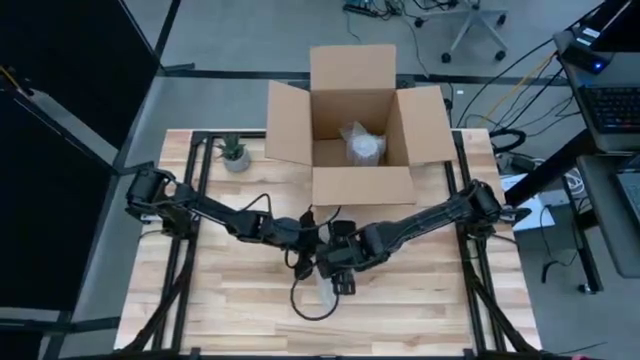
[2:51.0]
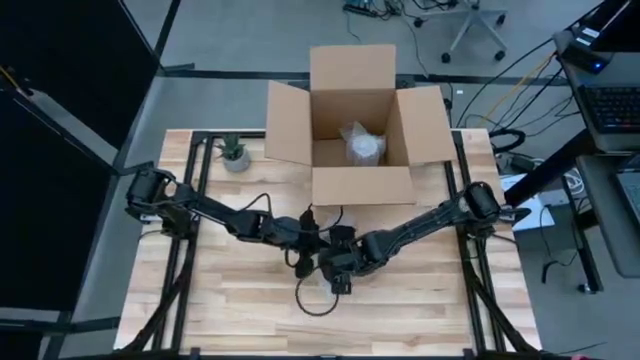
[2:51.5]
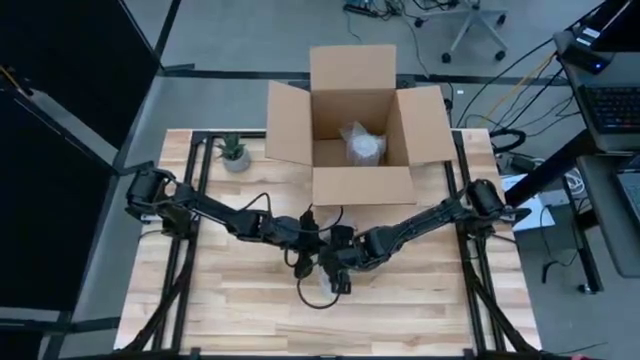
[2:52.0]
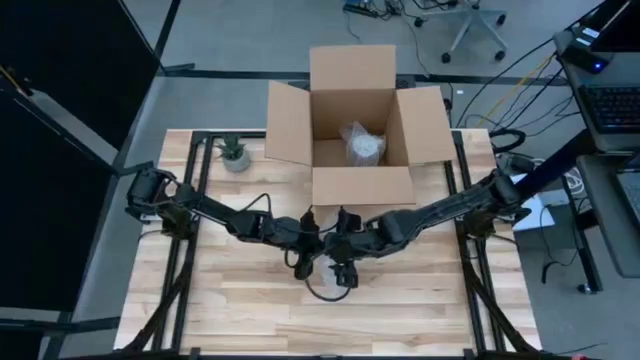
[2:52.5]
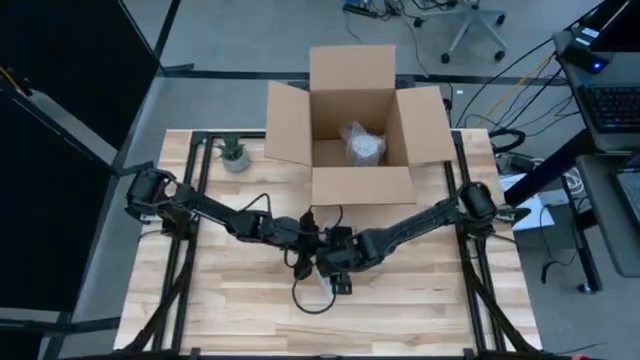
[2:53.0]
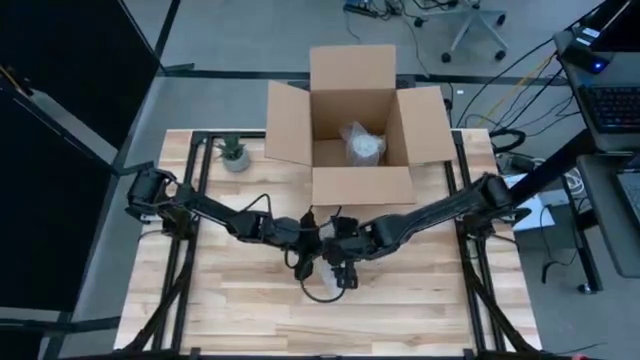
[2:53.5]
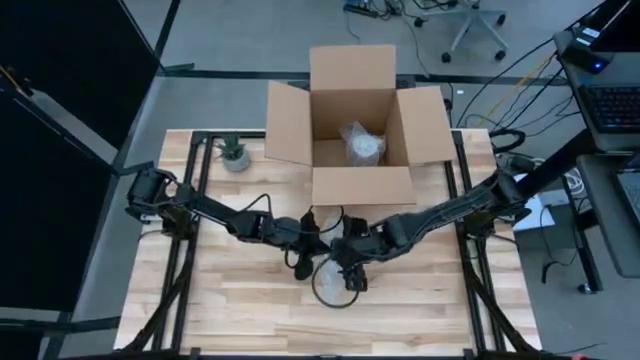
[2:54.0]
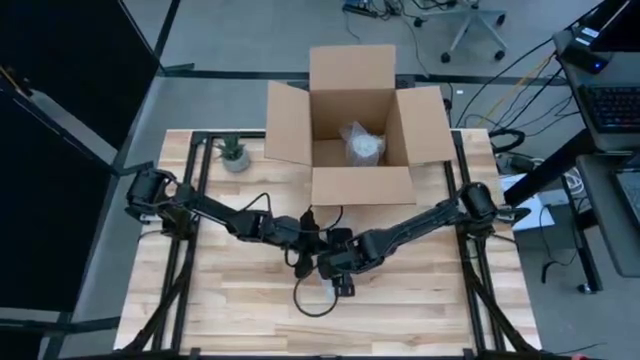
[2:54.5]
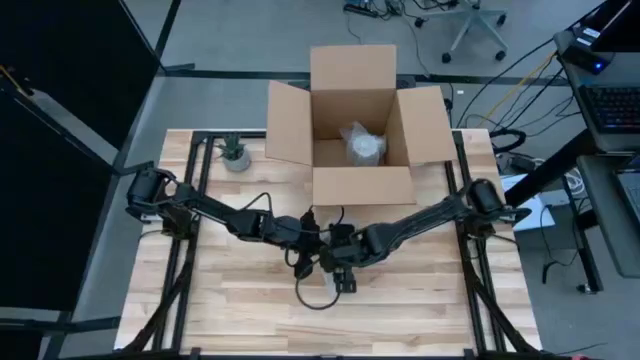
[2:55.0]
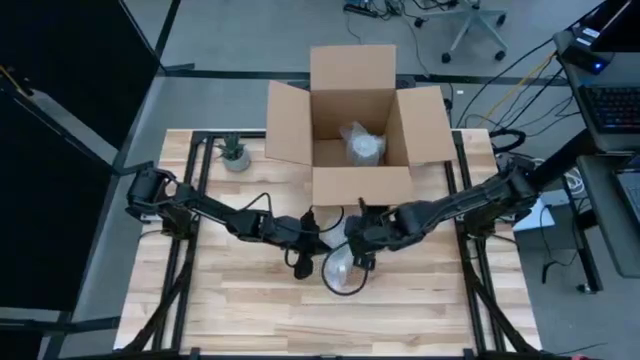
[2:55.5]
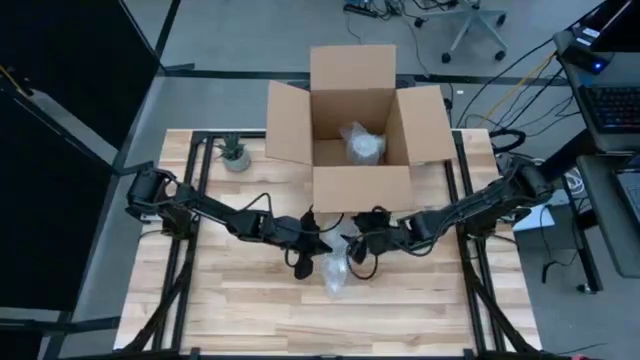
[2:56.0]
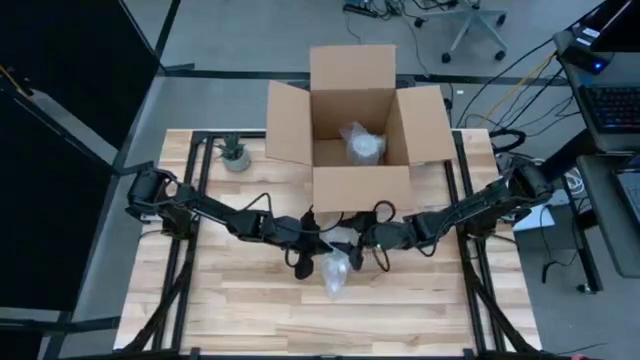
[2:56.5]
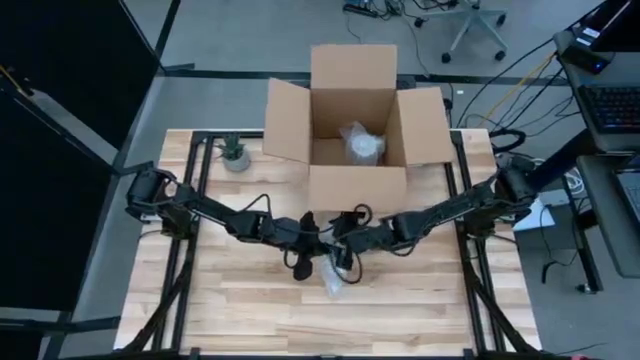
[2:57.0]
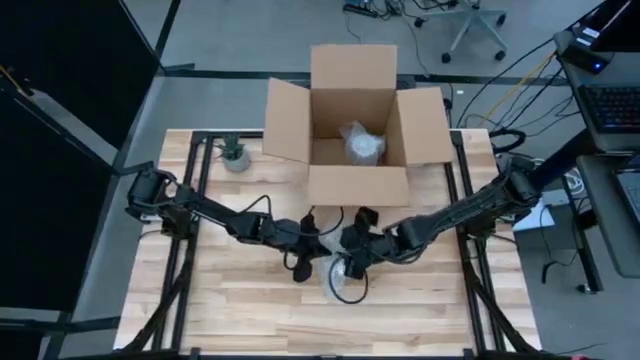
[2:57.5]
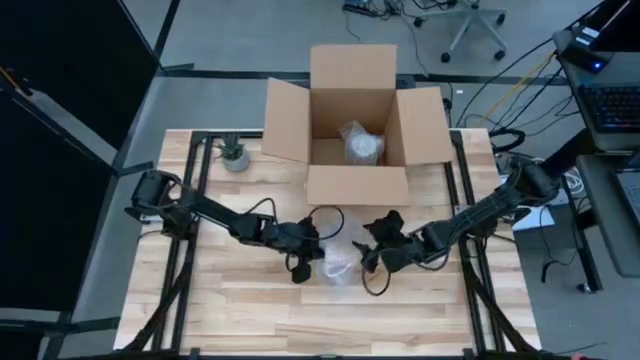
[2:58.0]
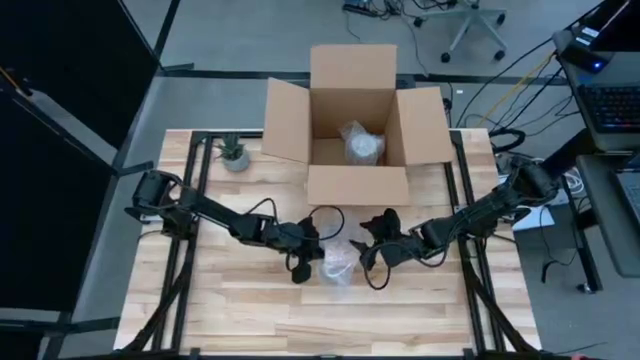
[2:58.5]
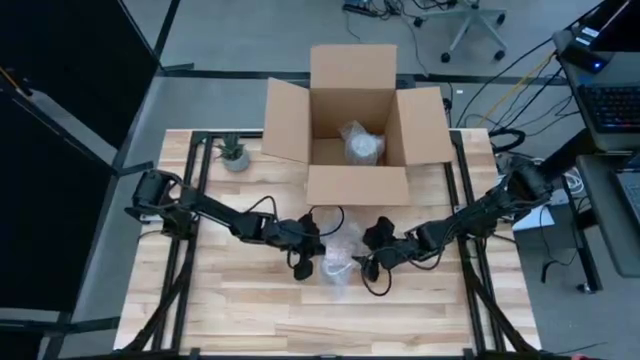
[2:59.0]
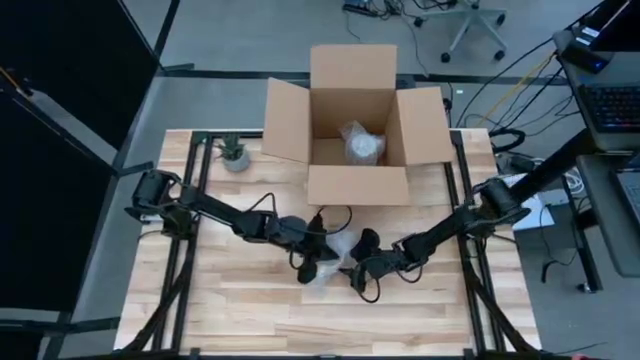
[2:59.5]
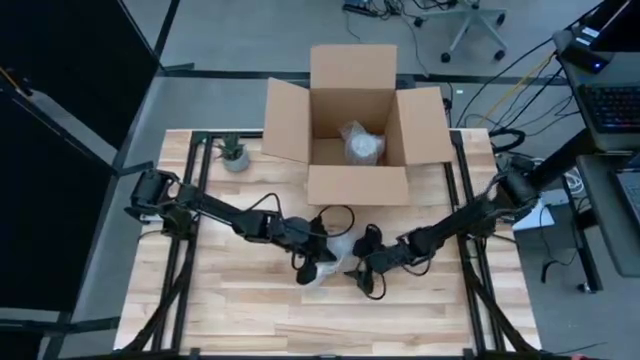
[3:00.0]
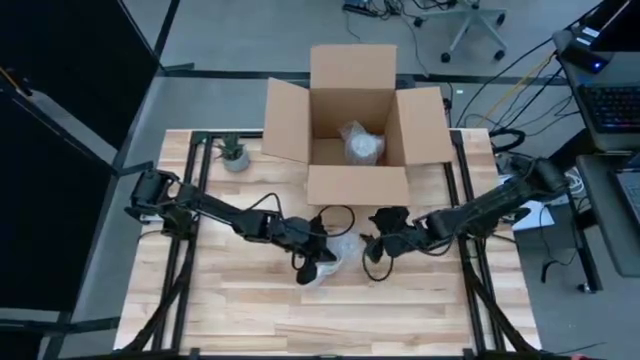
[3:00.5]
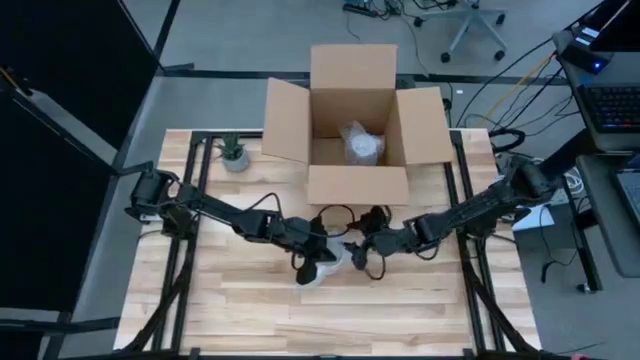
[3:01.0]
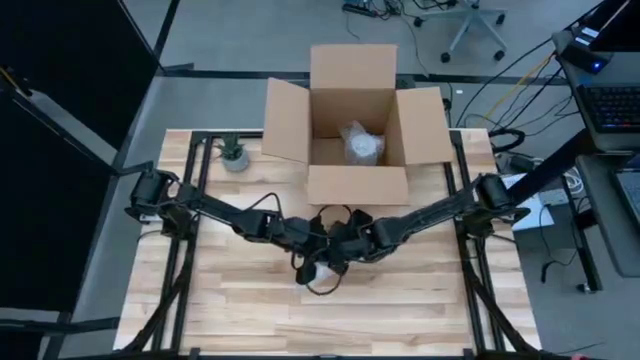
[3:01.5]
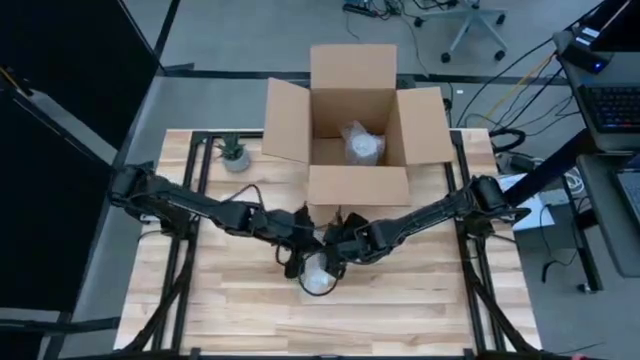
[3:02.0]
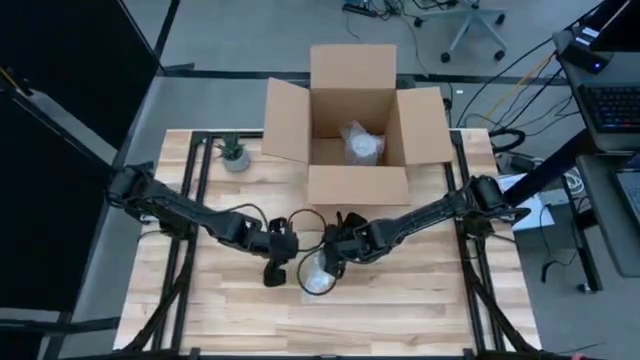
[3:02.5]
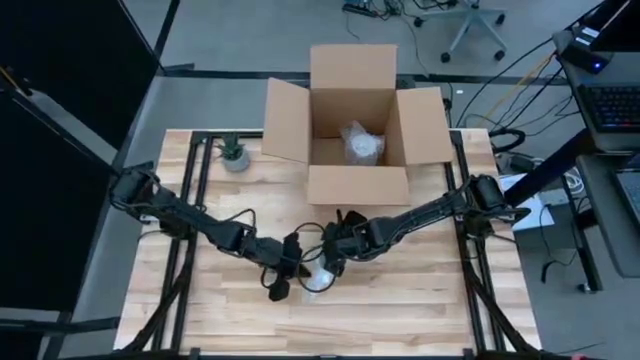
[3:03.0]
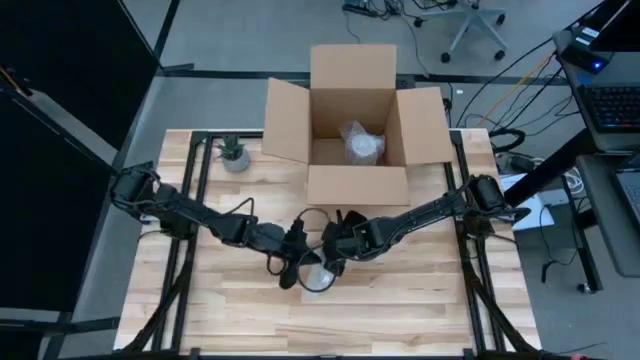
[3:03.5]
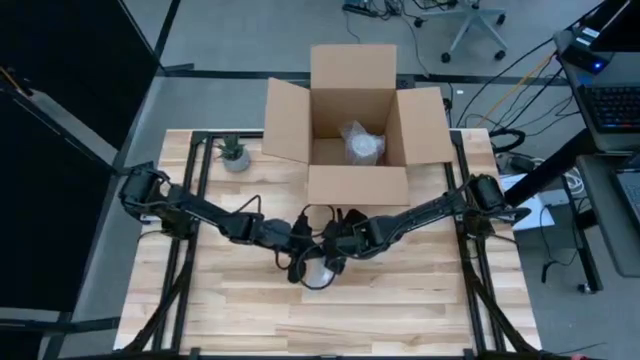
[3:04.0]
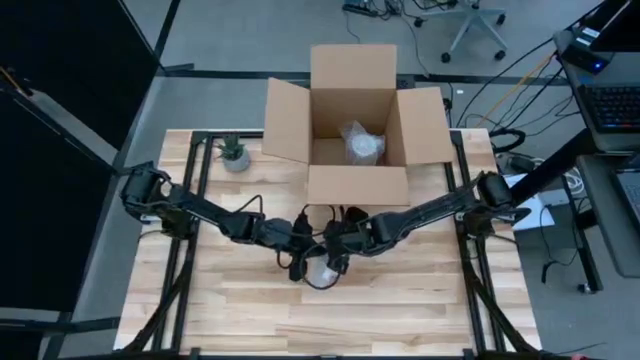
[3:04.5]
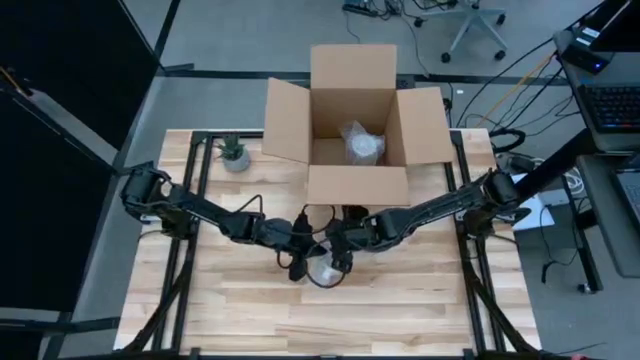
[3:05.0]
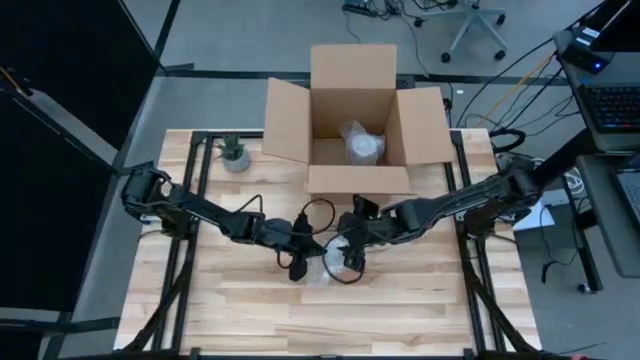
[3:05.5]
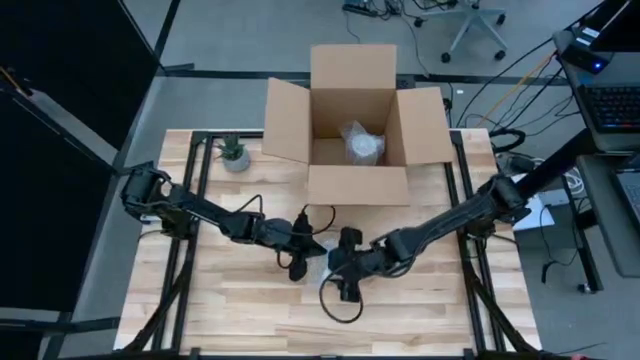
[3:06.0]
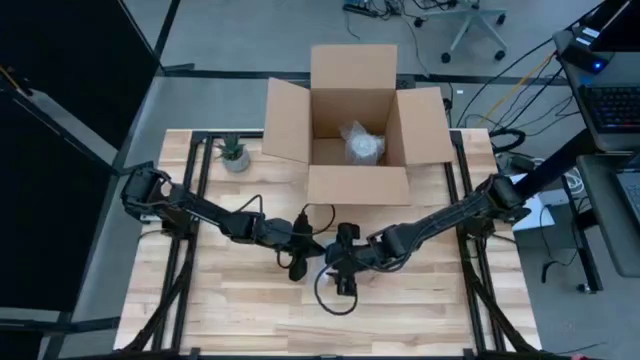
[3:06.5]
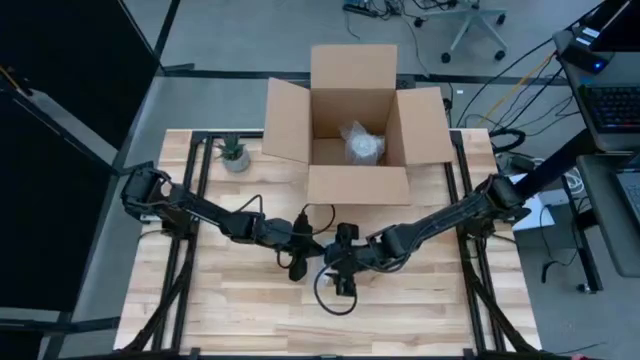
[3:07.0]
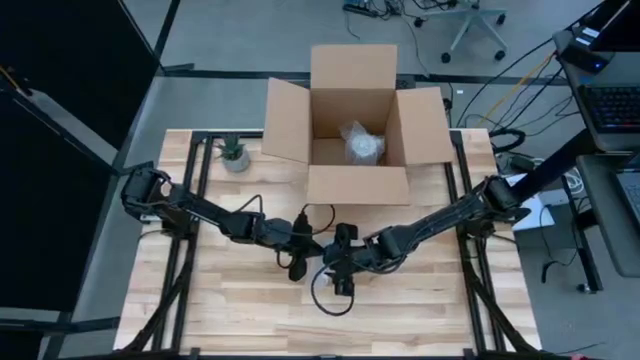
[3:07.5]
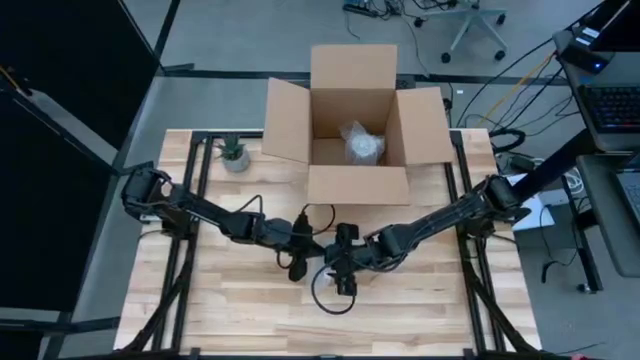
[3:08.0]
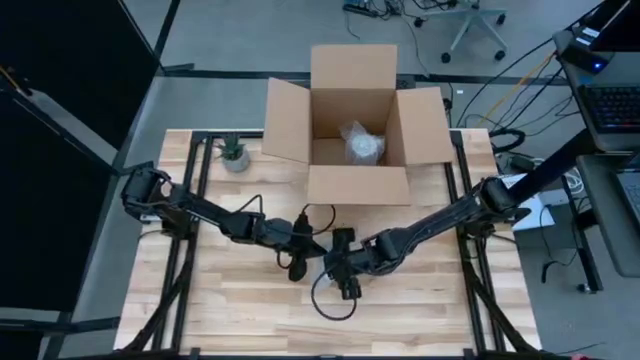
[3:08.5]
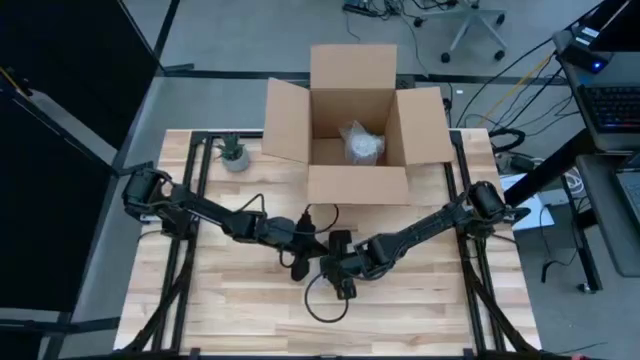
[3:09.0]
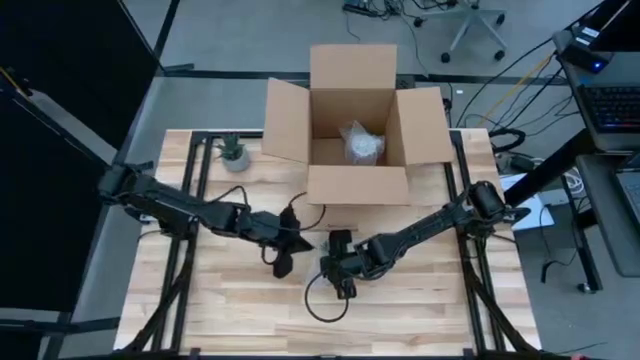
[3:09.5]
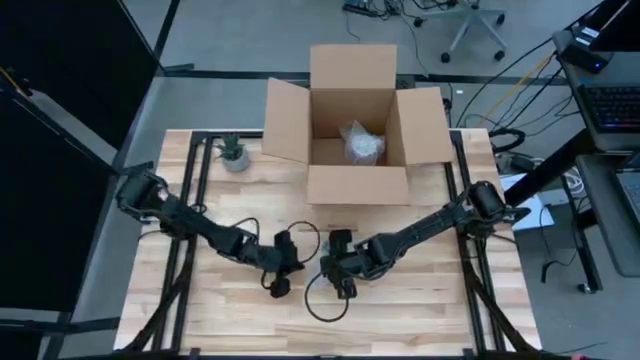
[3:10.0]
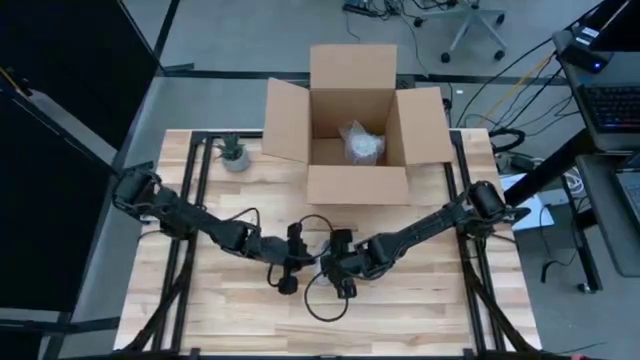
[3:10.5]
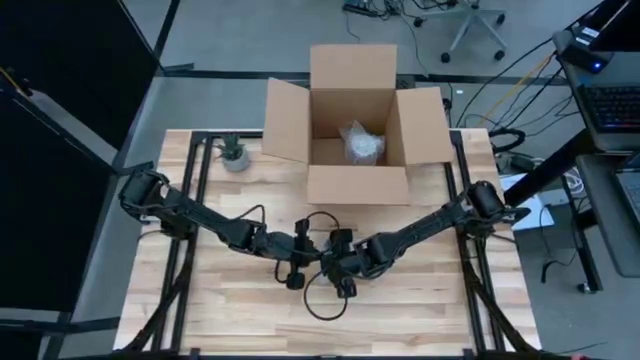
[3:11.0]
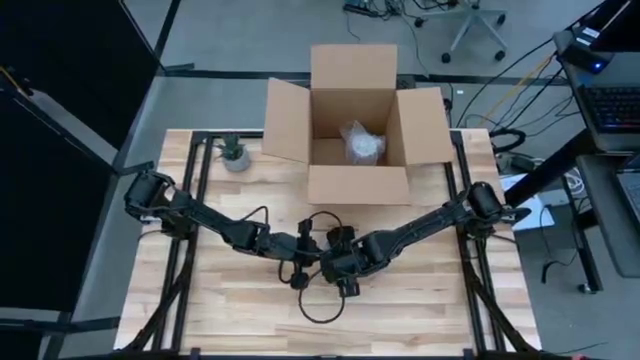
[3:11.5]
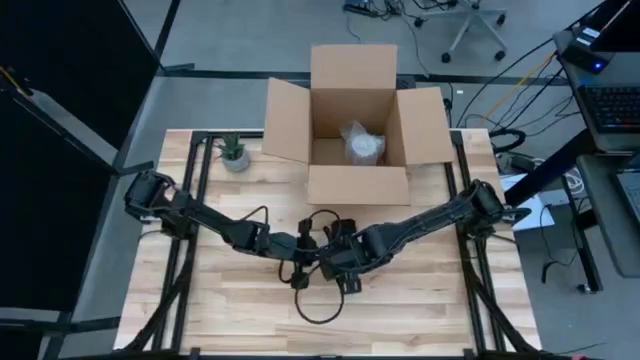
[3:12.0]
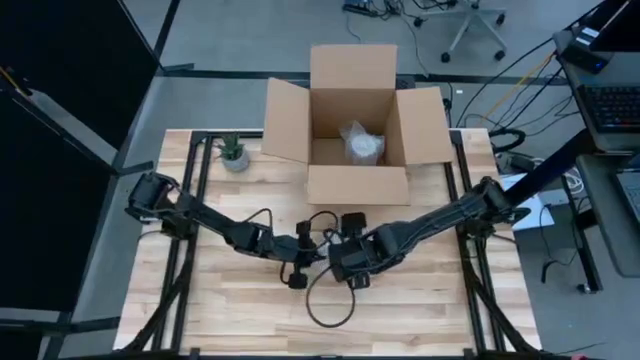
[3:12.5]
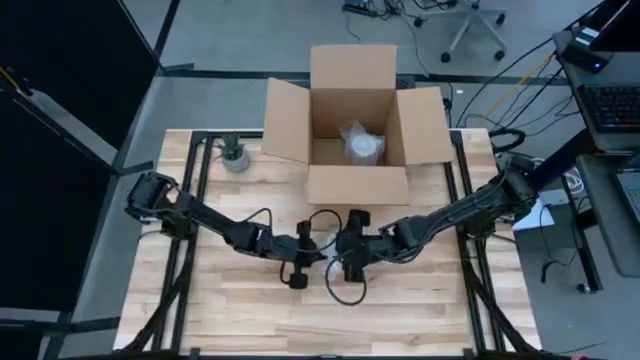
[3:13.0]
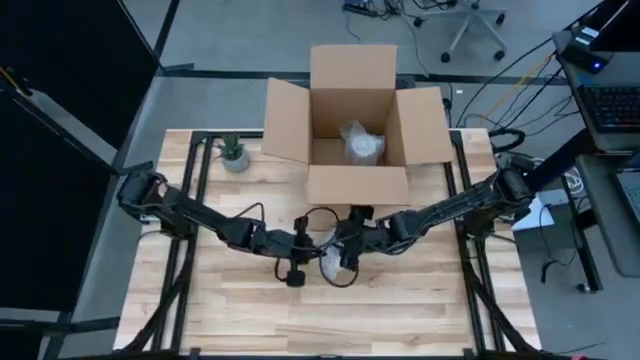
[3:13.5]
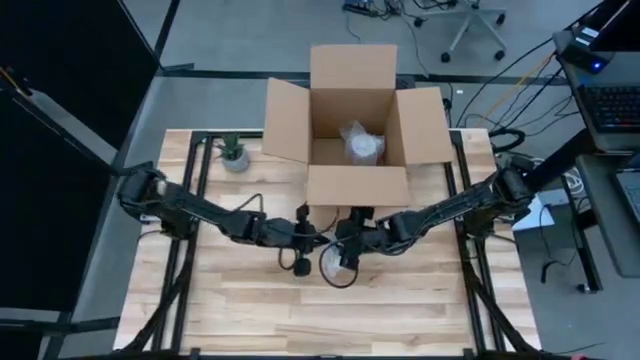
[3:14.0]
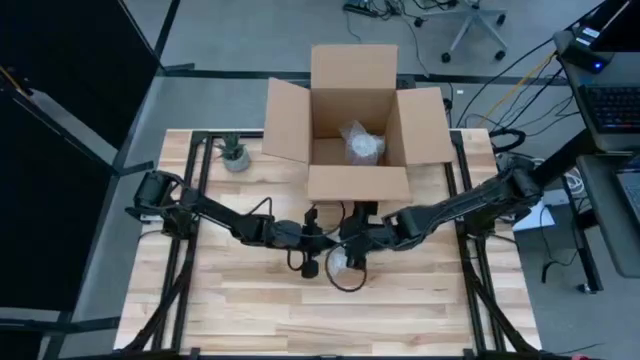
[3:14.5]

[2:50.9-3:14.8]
Task: wrap mug
Wrap the orange patterned mug with bubble wrap
